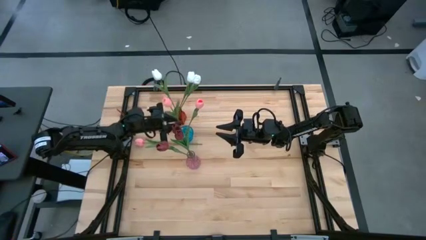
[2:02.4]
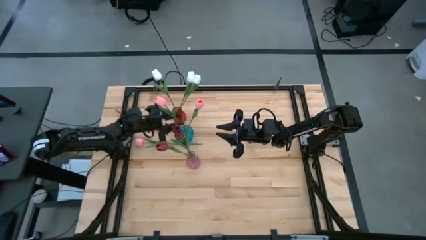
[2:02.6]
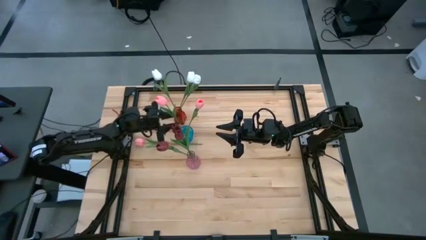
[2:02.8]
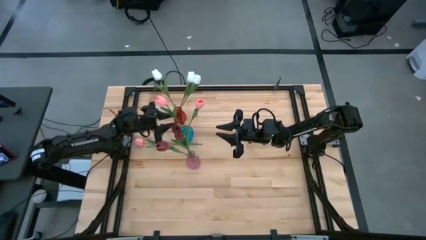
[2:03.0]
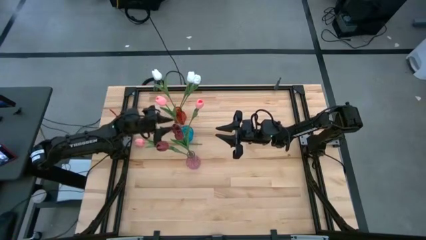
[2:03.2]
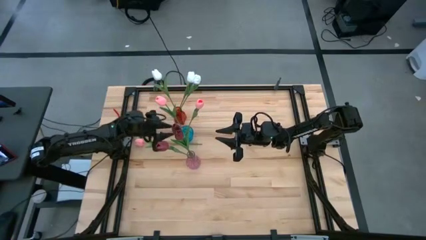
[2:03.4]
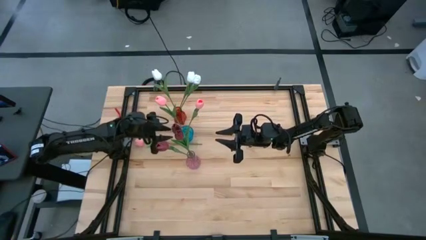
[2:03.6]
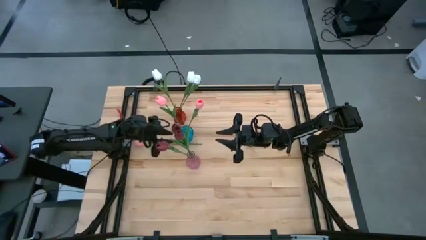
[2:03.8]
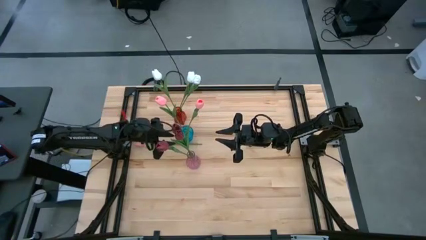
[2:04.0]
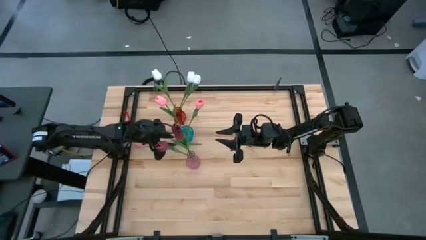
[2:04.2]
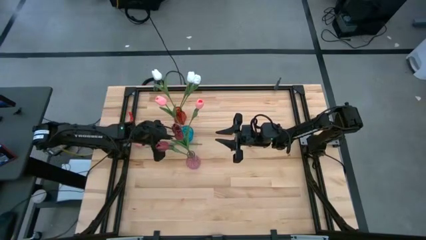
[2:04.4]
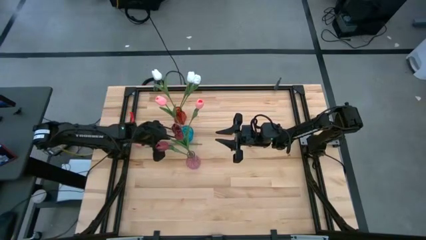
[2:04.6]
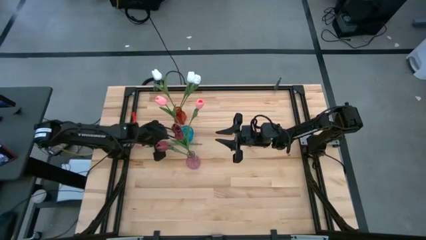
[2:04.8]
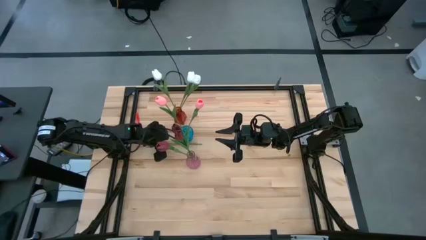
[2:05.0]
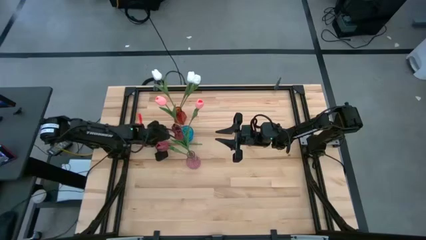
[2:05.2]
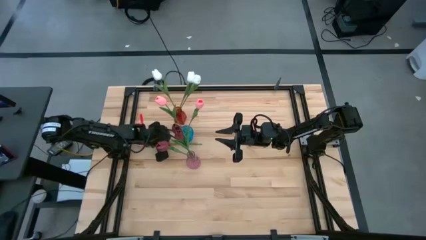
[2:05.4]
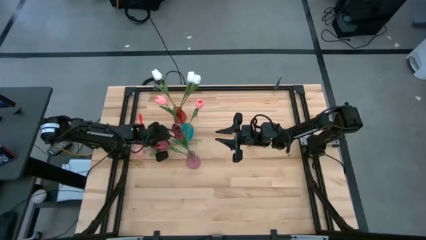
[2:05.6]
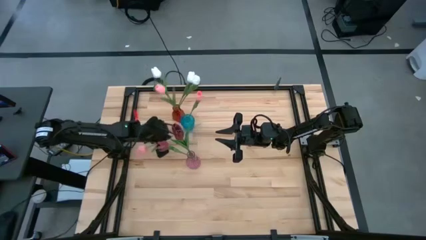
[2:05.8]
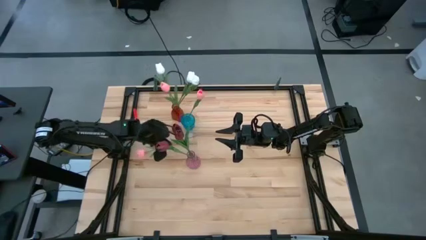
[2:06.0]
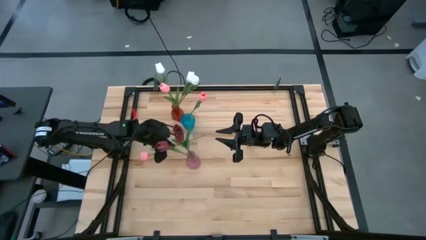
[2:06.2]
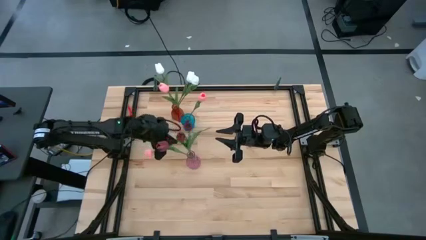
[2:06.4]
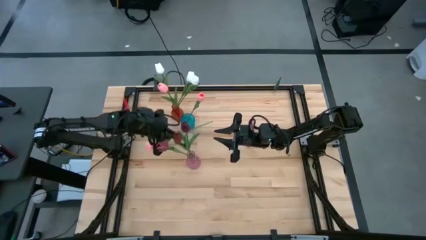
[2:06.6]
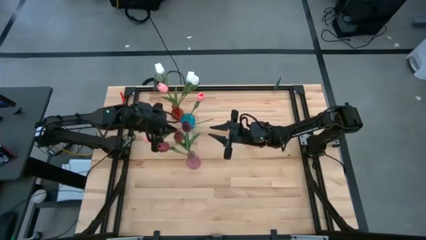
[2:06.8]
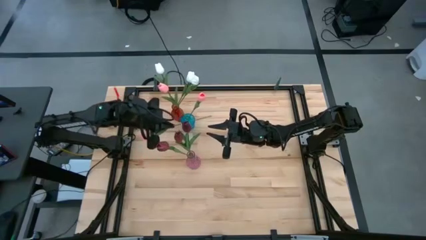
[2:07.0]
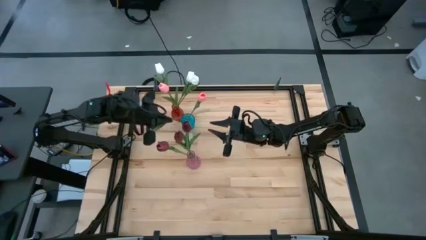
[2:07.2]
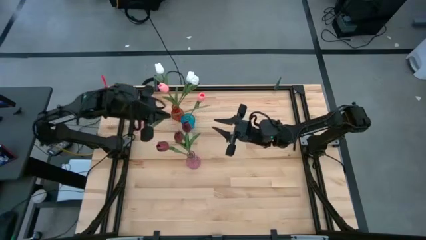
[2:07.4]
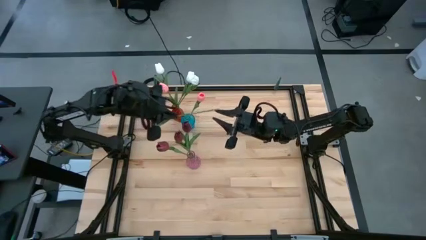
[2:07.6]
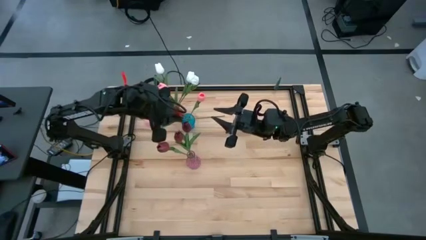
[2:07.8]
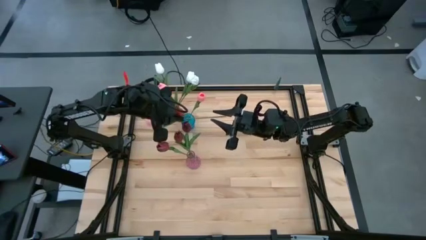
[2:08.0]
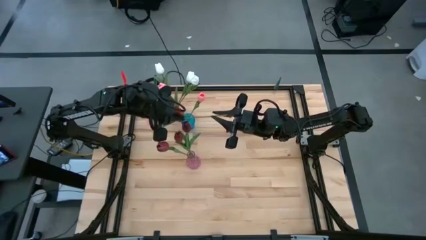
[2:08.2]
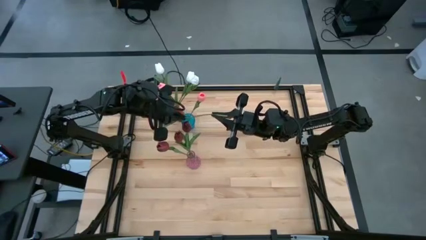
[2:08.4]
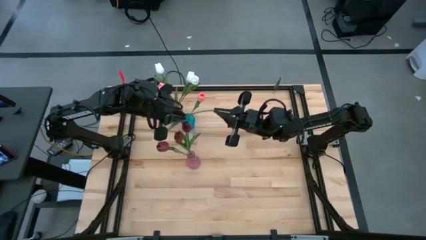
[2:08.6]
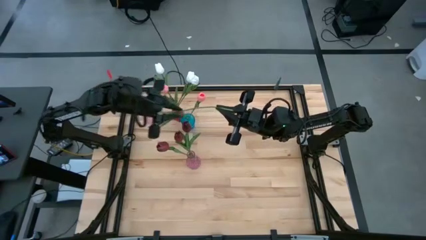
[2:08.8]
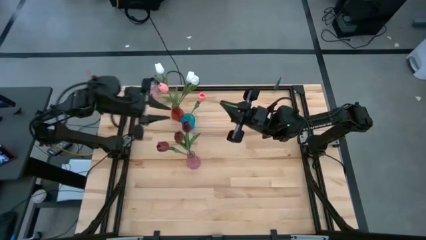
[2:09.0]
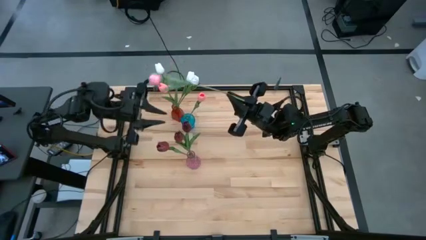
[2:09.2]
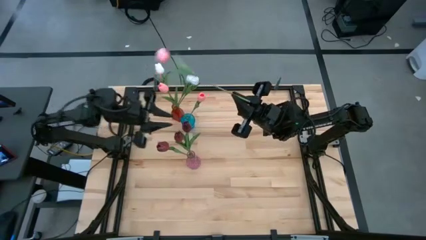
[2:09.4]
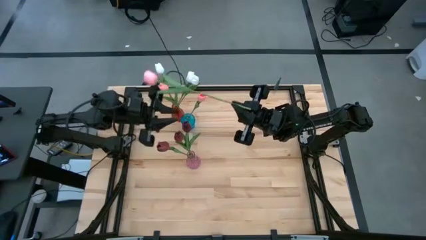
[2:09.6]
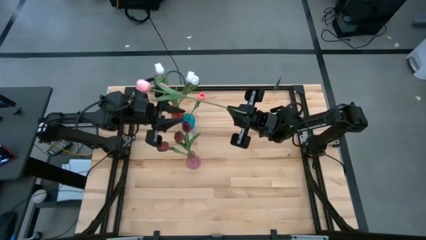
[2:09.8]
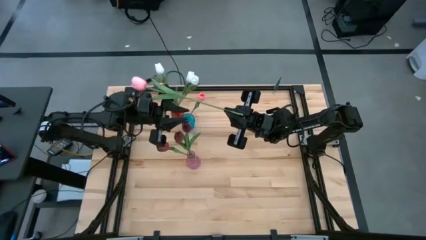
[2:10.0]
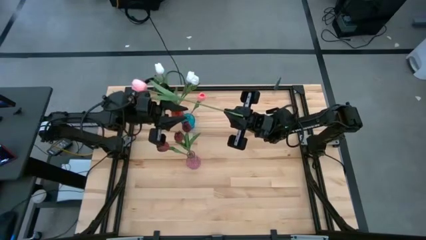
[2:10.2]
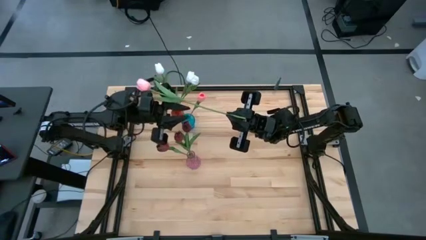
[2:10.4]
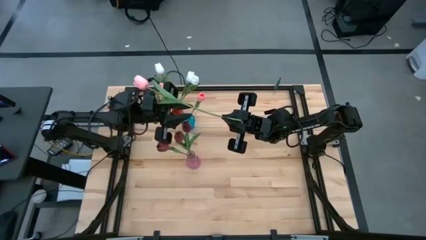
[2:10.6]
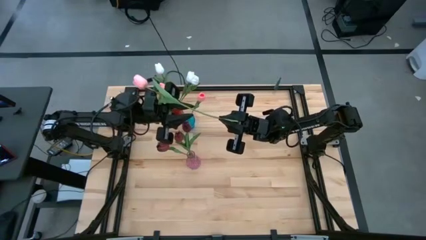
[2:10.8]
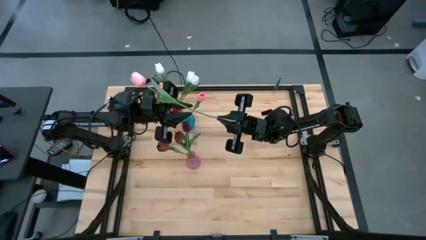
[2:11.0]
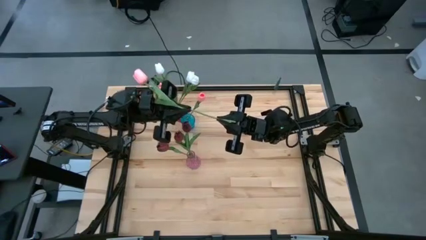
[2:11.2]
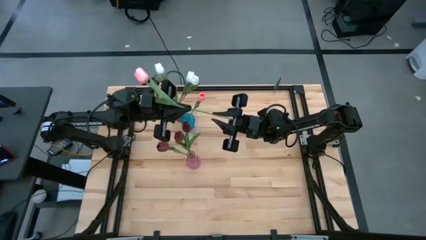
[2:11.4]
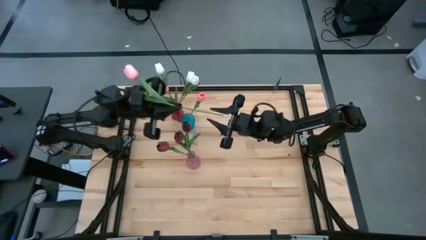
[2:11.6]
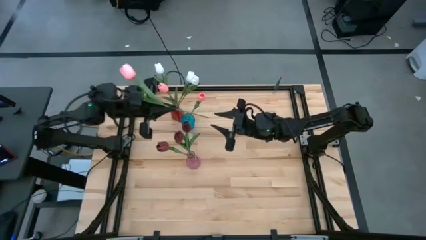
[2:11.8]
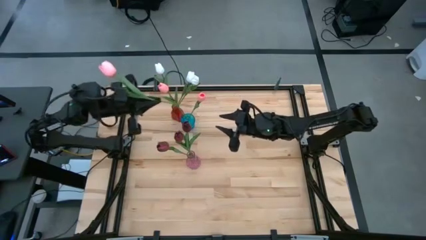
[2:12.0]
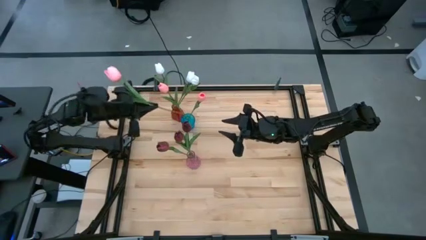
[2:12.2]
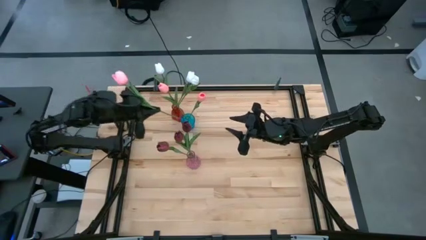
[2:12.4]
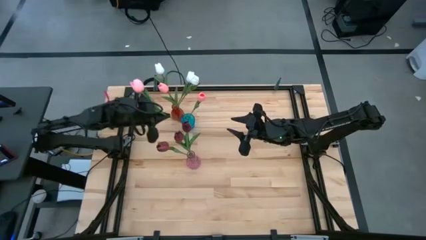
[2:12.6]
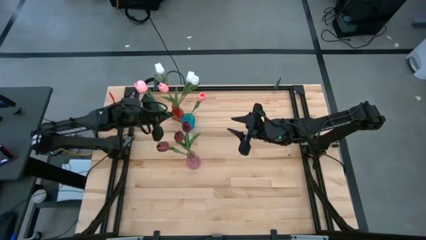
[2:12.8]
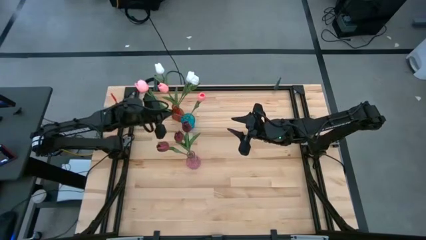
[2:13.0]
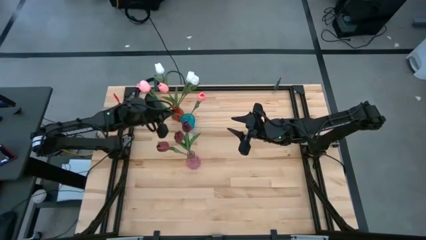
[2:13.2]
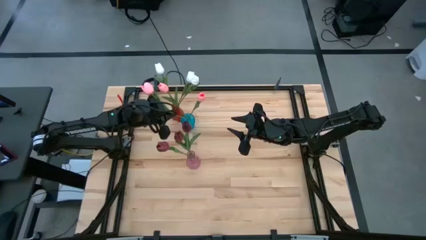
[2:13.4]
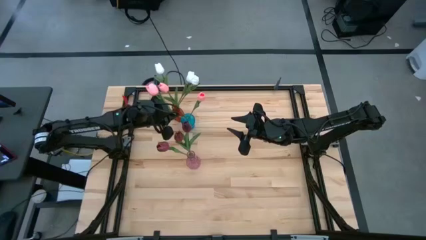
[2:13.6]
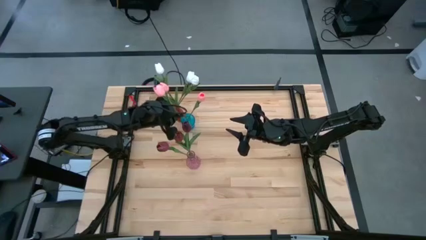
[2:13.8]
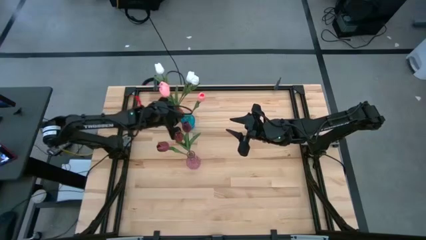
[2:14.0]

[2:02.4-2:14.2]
Task: Sort flowers into vase by color
Put the pink flower into the blue vase

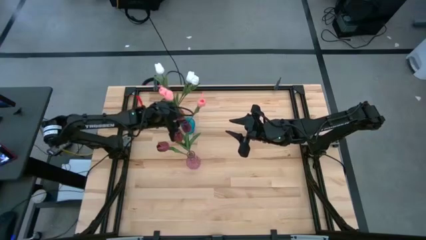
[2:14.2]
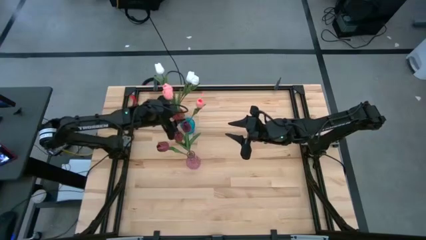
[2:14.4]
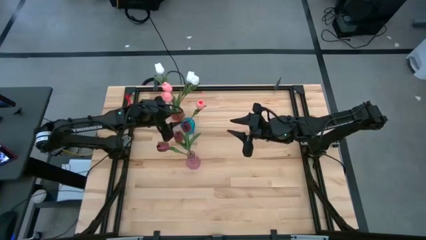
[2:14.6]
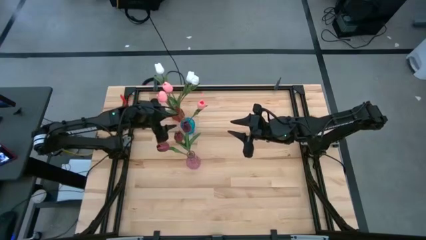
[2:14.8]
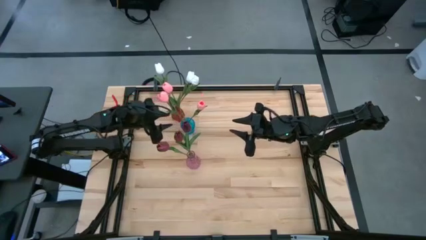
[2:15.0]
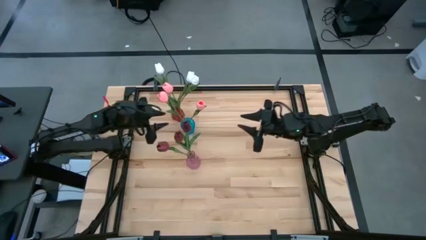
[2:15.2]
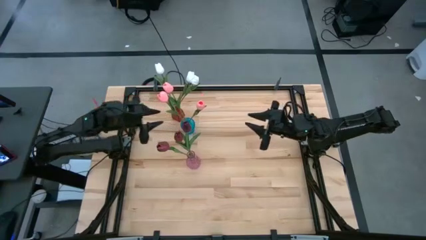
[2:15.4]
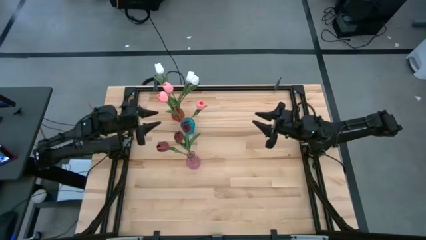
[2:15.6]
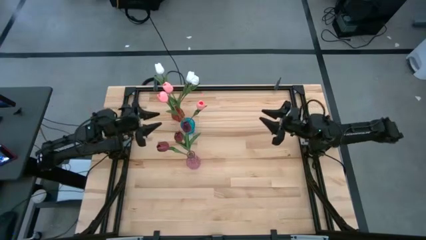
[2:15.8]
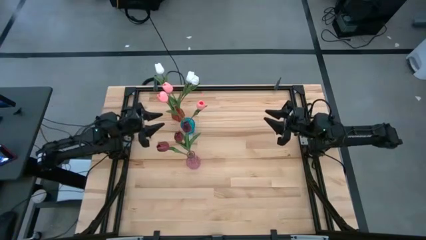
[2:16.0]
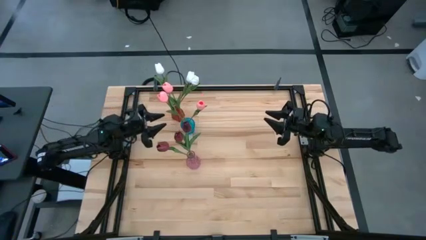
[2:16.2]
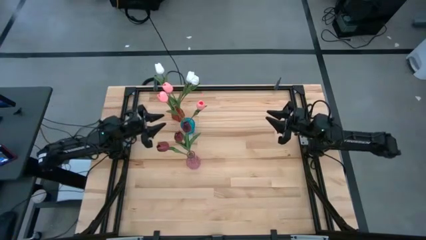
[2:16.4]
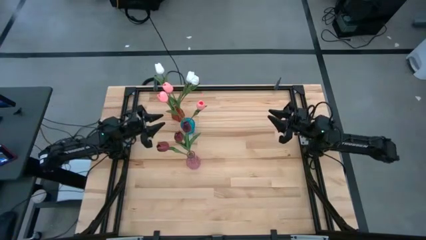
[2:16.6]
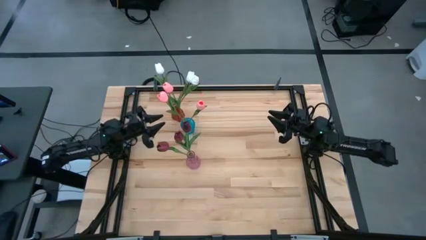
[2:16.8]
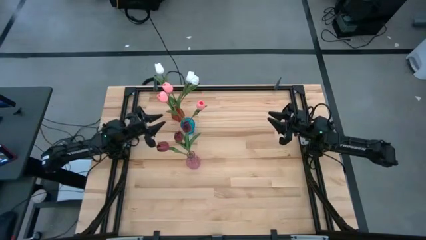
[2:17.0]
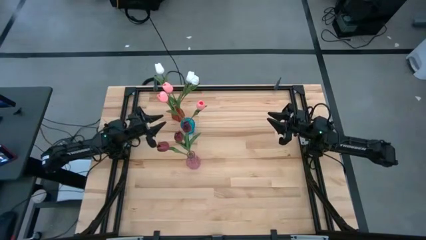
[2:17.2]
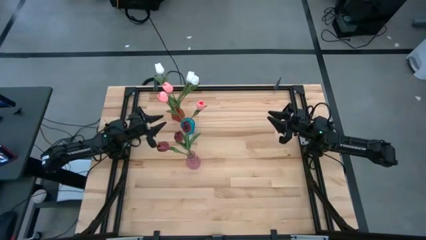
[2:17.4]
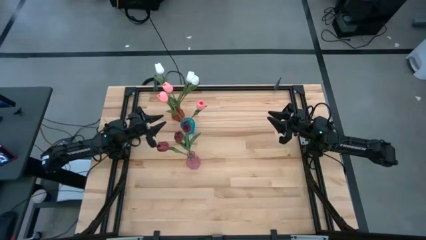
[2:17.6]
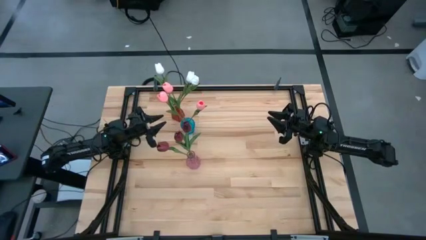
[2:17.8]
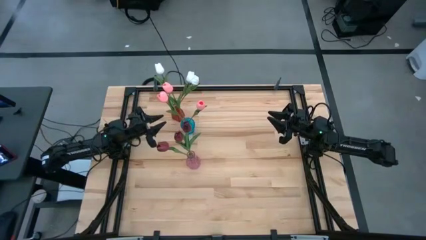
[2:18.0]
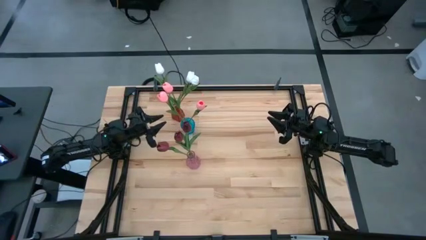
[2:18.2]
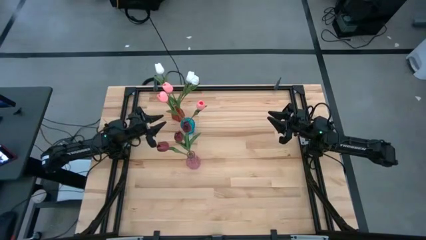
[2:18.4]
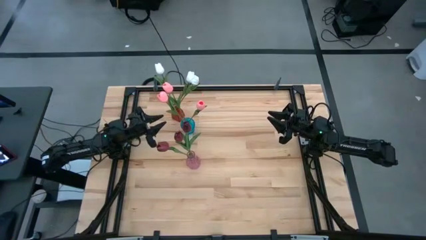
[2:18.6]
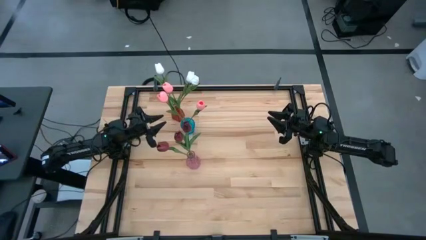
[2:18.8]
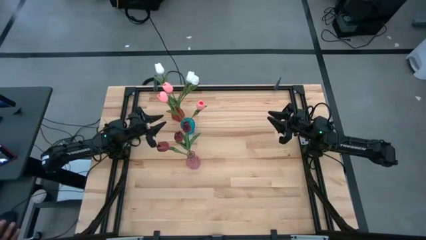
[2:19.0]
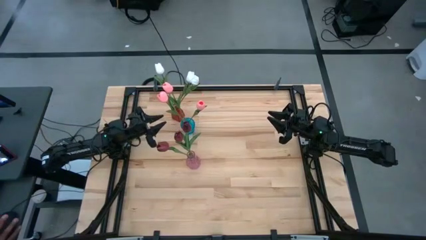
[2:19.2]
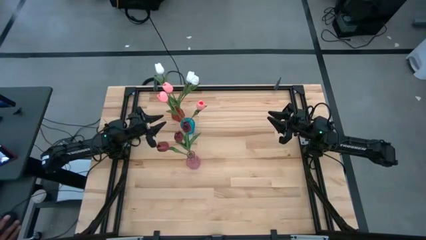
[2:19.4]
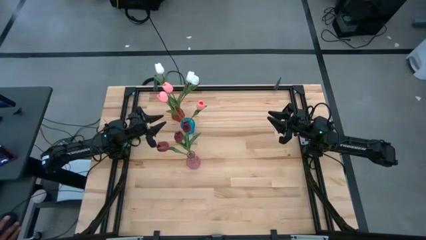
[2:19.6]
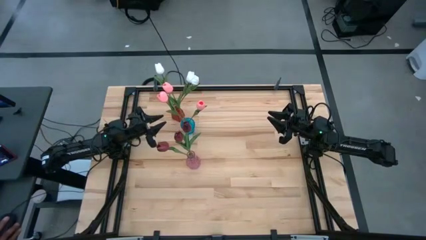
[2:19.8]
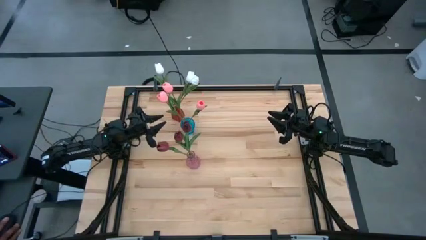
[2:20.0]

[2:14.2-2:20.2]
Return to Home Position
